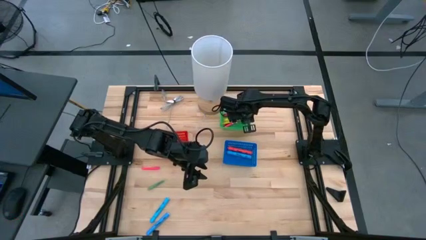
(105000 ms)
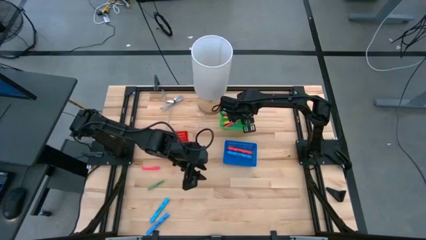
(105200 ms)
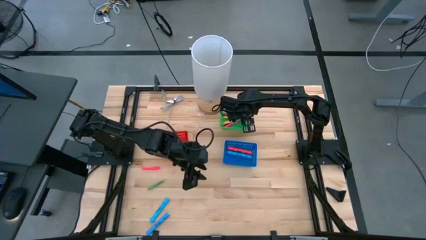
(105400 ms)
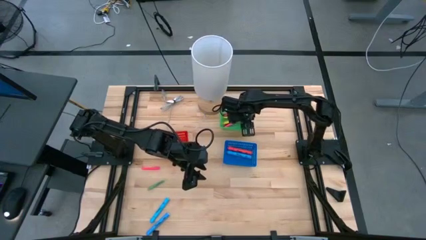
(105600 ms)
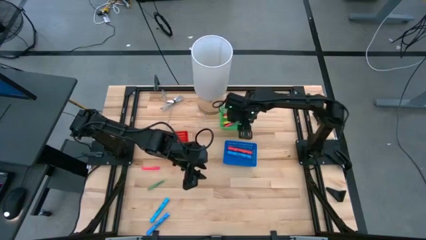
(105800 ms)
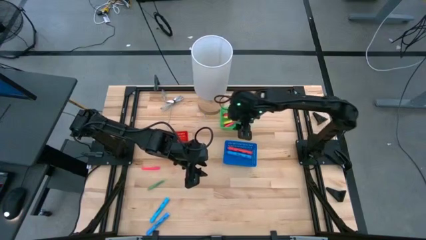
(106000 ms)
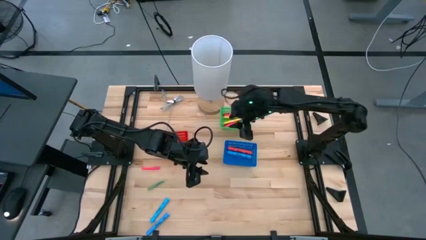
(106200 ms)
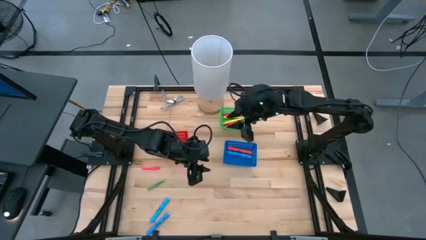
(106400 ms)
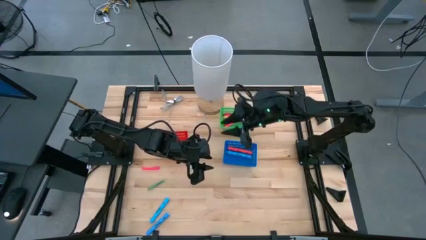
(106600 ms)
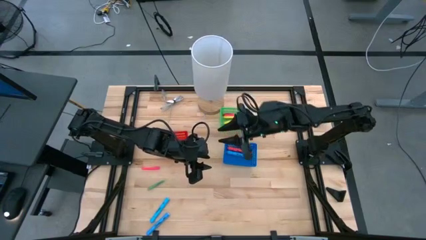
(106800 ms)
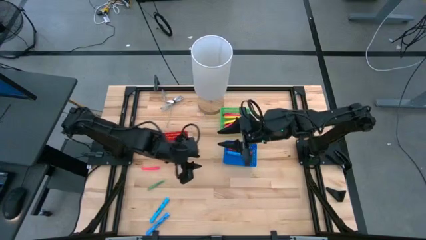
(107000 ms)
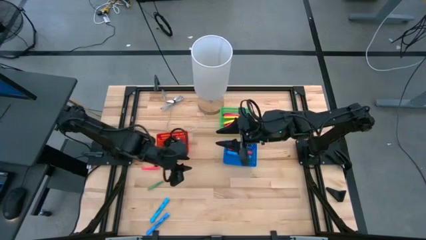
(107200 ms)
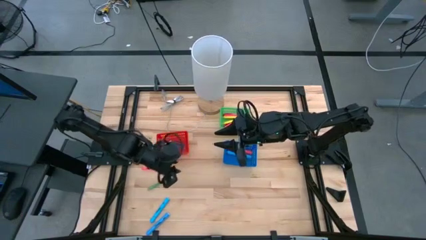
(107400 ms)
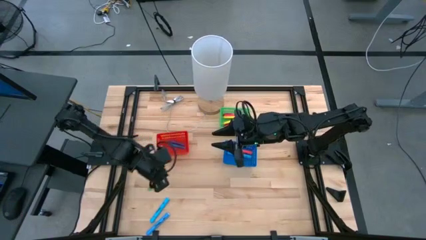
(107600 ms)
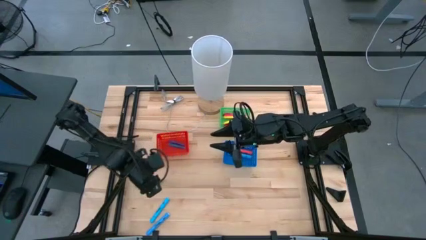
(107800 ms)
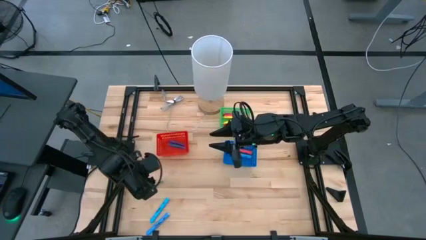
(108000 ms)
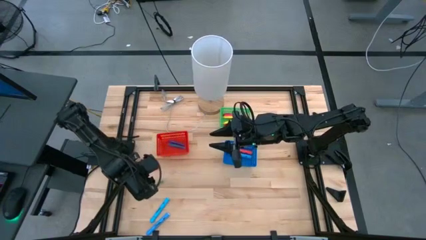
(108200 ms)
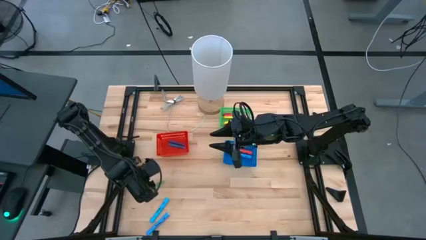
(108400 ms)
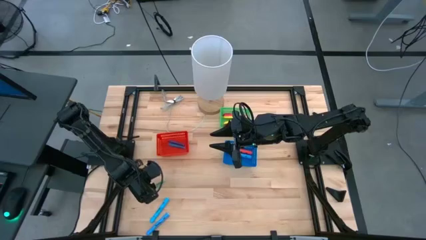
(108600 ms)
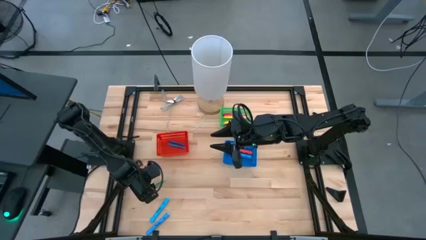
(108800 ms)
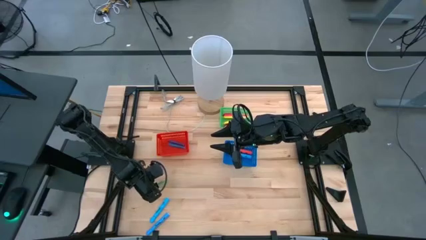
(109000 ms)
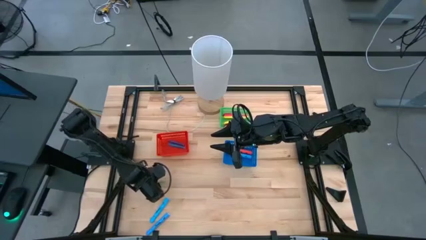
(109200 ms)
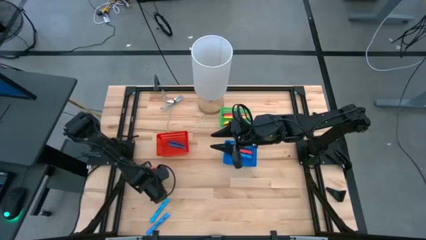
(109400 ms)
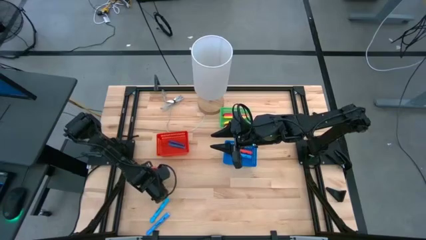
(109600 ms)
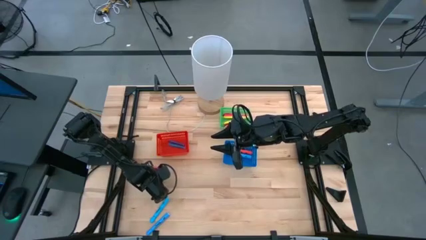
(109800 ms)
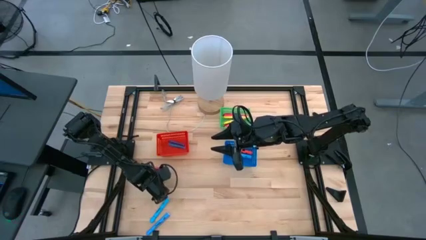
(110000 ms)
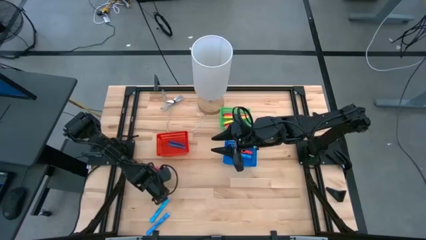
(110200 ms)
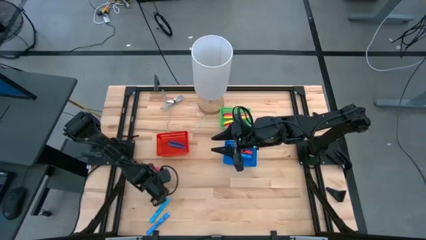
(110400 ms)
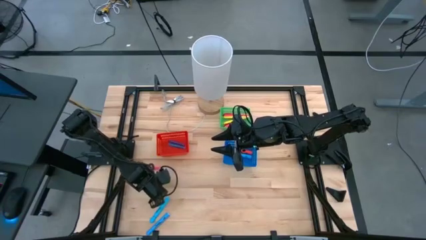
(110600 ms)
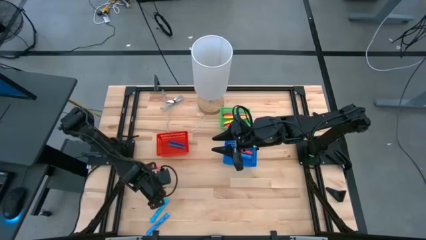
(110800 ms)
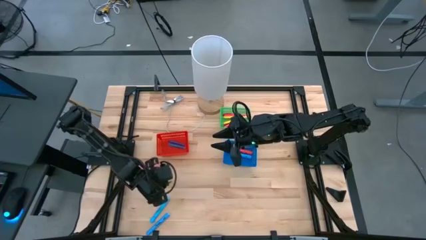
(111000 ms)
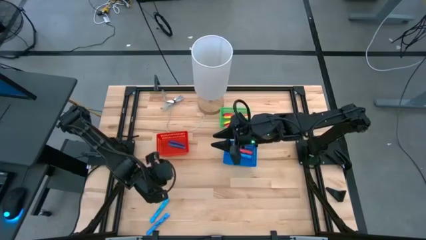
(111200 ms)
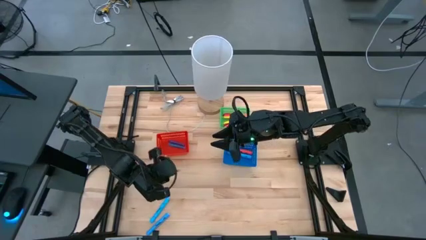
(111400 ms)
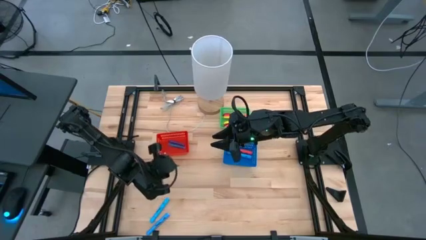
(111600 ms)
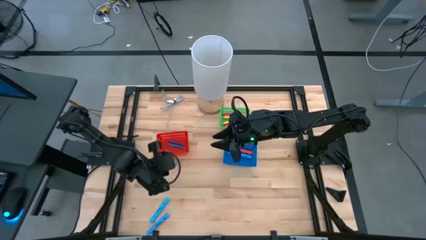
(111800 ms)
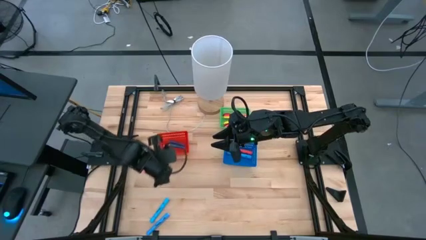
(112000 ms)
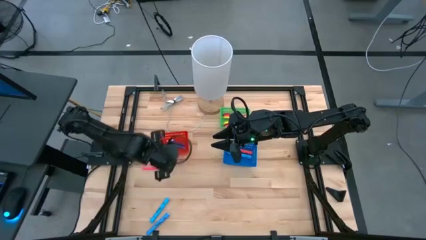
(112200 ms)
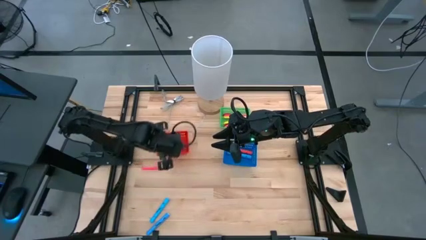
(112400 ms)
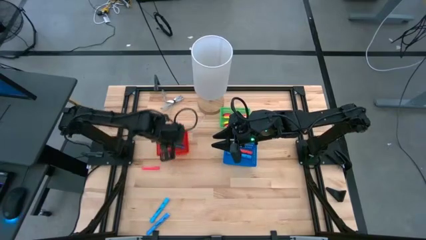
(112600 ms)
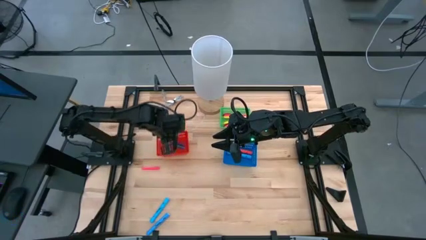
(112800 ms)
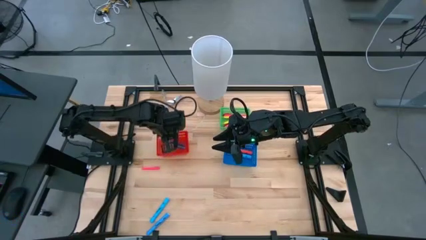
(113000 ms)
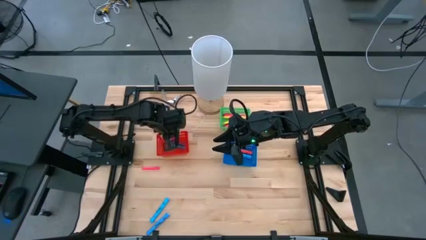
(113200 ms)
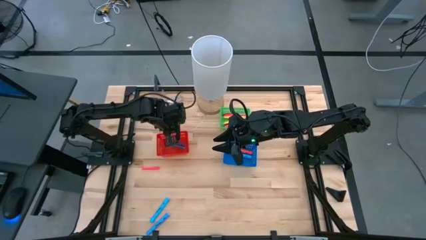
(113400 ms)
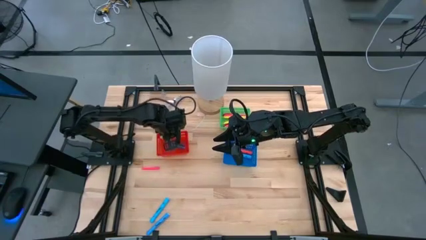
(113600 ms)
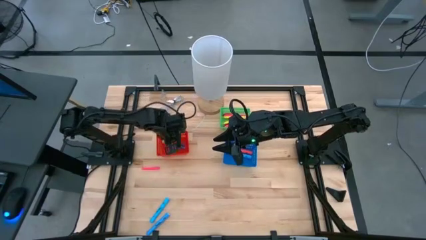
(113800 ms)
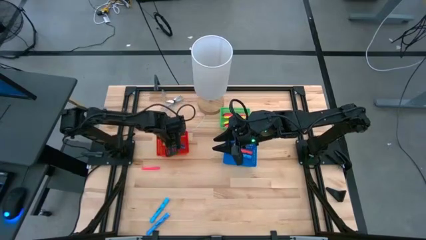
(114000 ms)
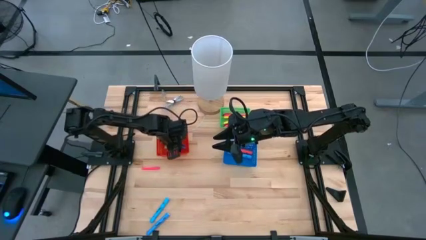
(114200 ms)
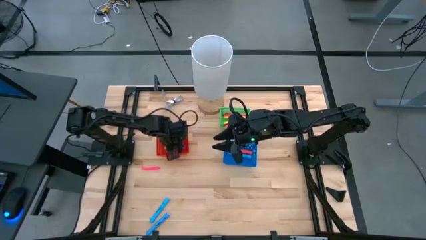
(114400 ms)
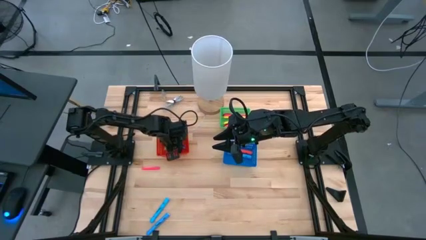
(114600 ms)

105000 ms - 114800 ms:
Task: Pick & Place Markers
Put the small green pen into the red bin
